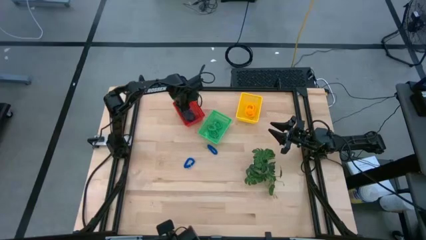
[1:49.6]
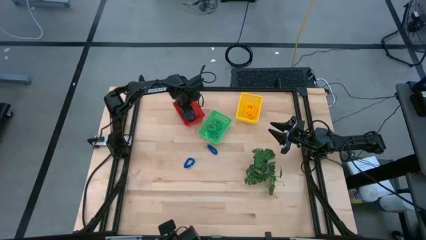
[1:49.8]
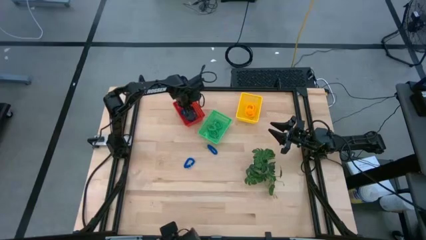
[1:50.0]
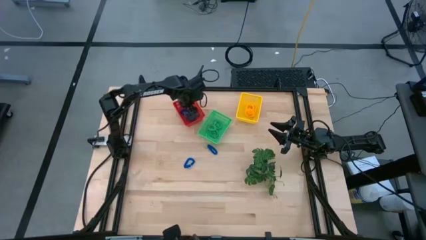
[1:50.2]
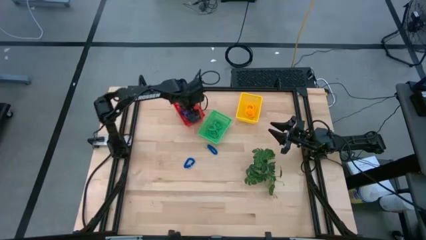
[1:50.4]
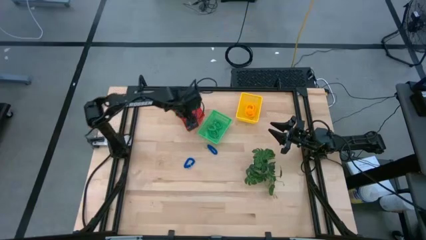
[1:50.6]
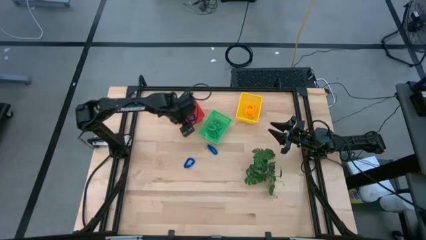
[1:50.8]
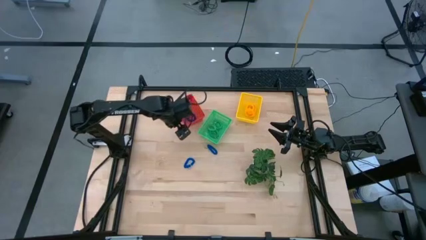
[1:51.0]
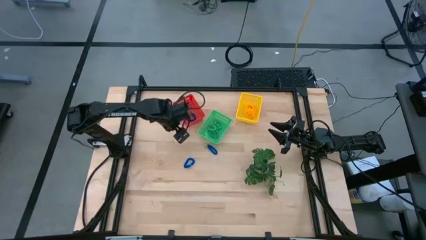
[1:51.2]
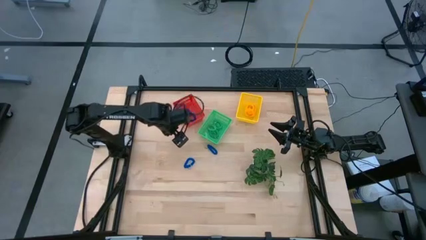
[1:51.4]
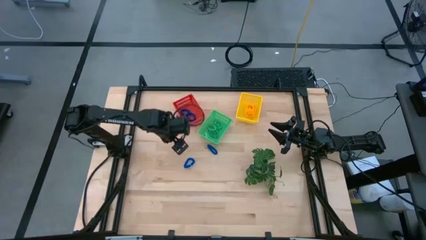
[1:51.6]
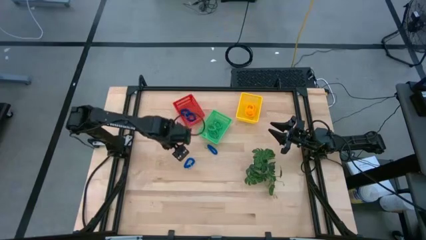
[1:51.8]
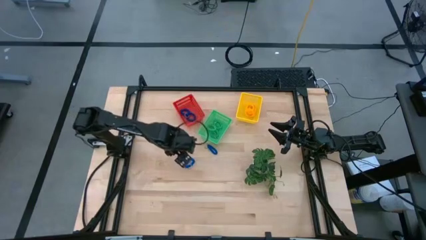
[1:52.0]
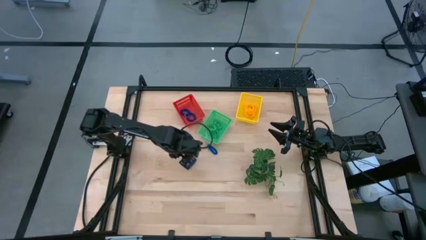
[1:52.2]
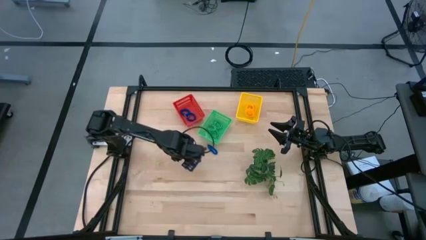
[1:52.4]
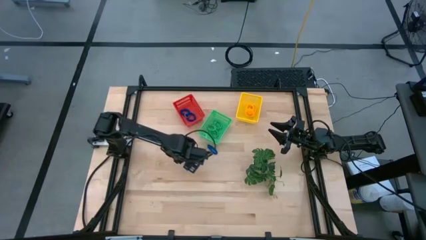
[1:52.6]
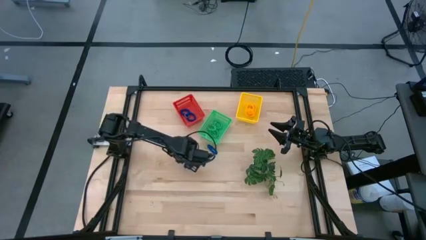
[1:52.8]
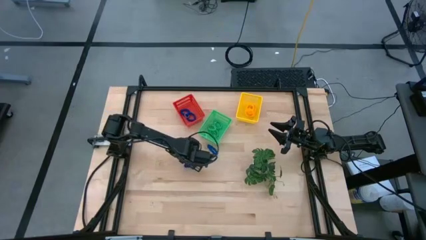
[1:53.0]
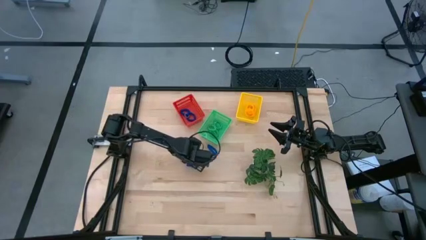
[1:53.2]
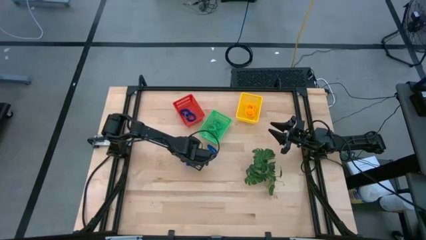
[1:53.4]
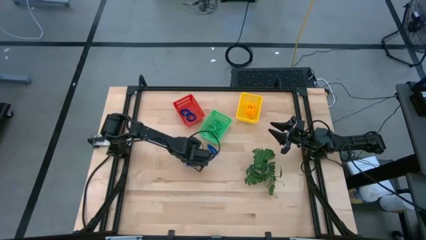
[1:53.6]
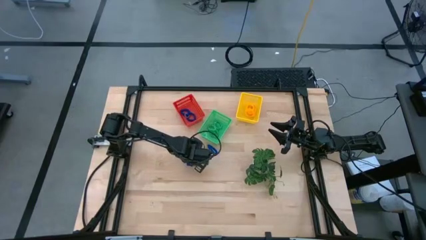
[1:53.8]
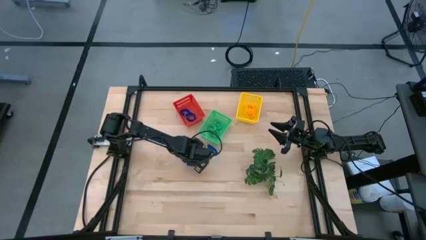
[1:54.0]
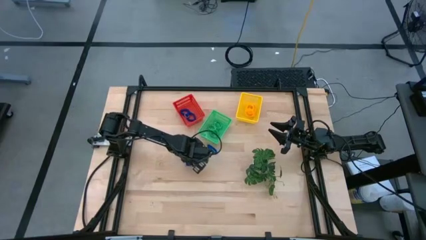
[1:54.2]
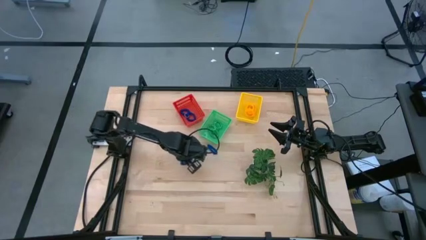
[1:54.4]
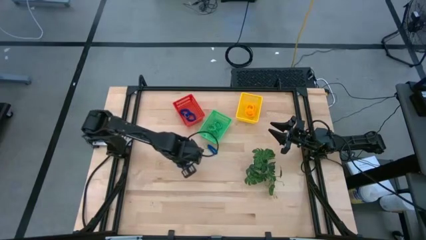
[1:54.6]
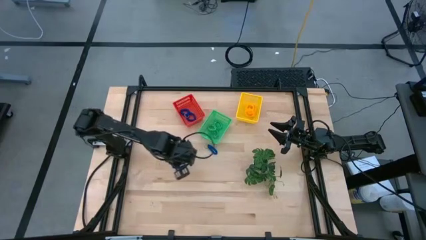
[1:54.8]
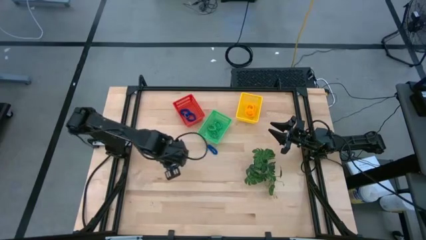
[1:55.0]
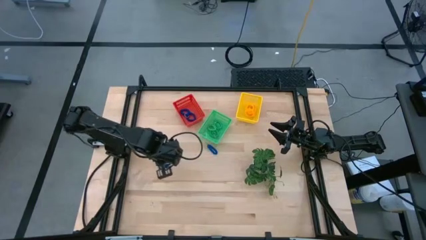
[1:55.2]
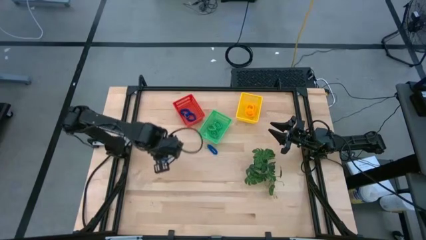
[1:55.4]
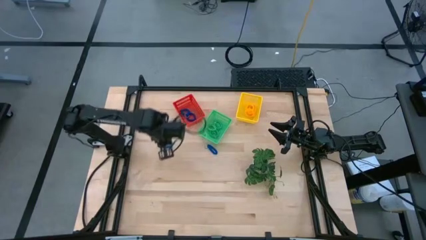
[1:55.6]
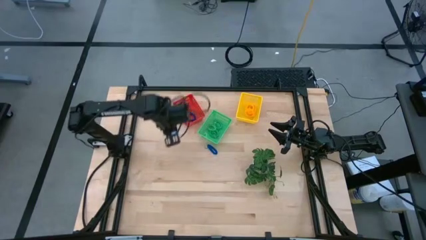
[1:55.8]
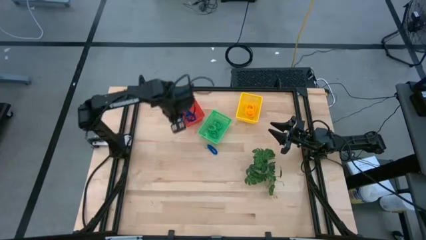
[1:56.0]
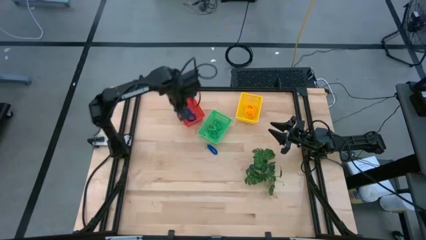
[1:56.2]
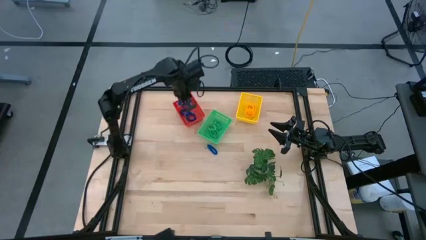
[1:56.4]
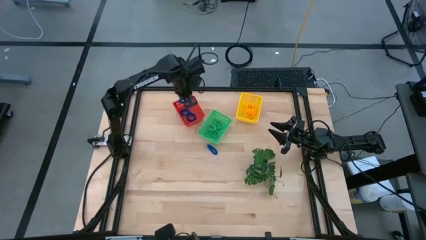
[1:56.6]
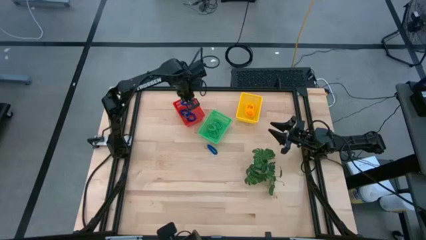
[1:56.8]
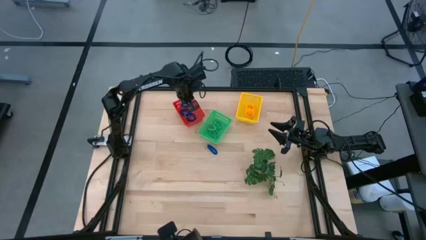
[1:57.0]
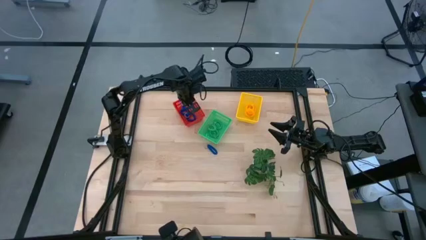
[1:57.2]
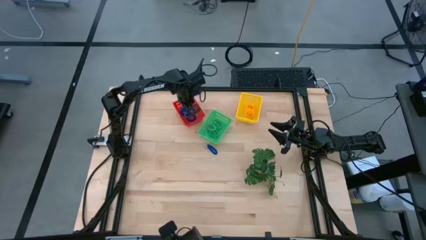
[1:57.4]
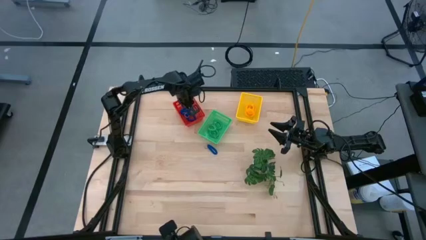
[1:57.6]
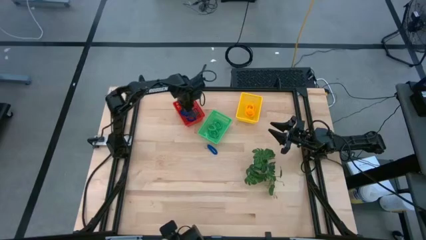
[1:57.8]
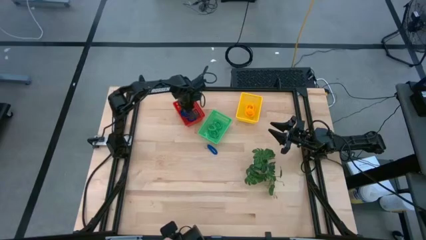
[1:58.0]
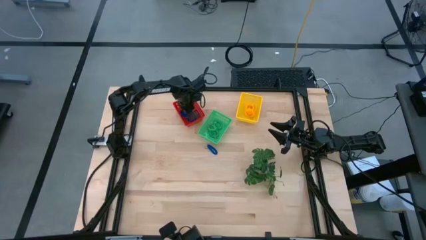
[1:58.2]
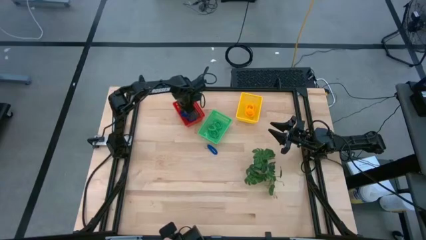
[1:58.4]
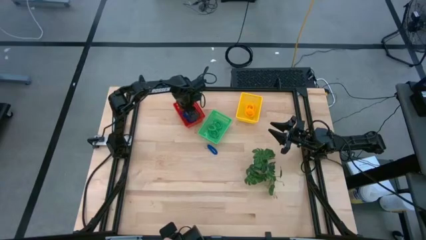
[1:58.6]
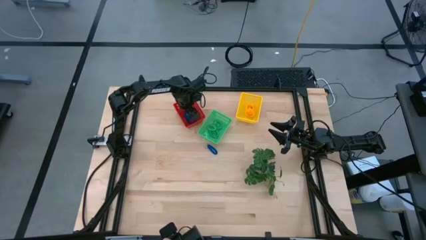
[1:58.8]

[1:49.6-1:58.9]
Task: Sort spring keychains
Put the blue spring keychain into the red bin

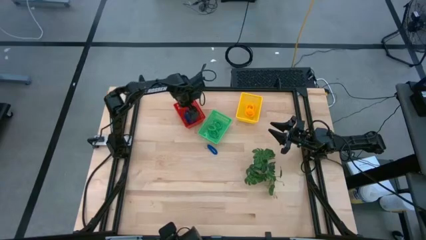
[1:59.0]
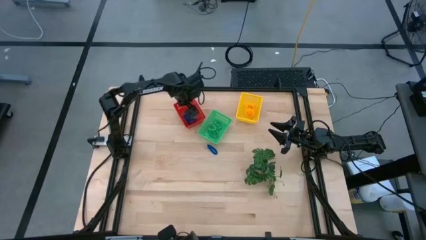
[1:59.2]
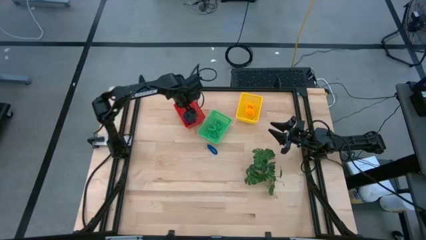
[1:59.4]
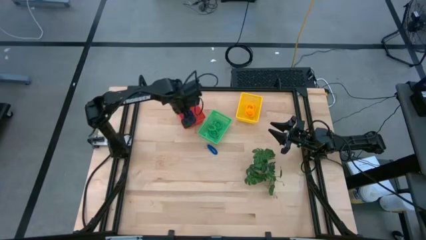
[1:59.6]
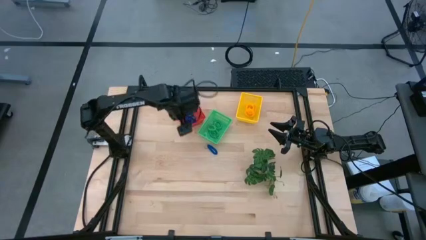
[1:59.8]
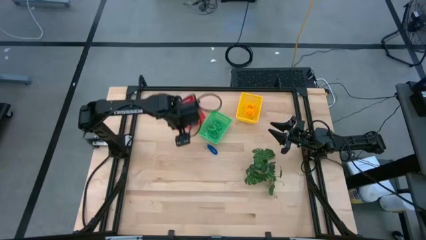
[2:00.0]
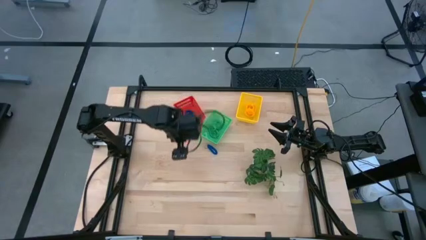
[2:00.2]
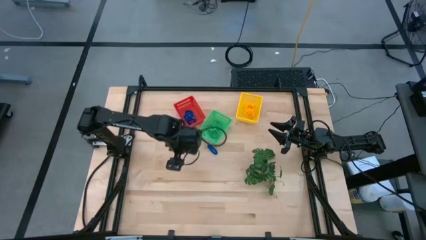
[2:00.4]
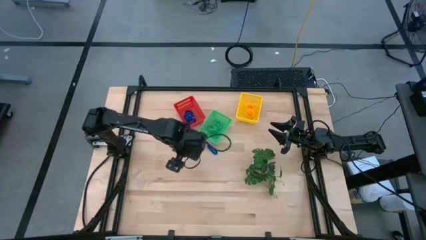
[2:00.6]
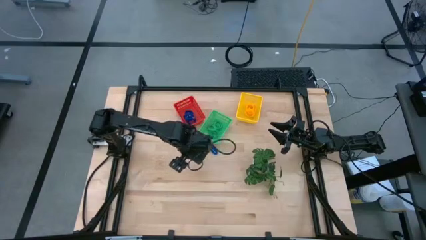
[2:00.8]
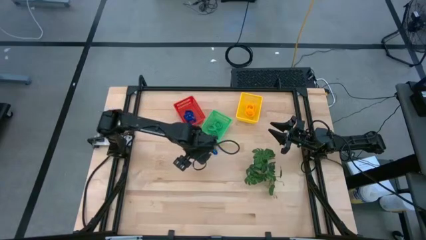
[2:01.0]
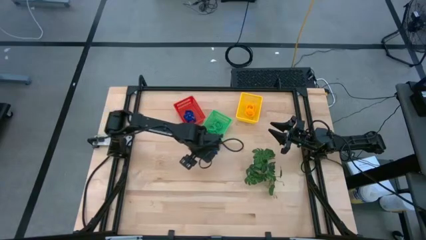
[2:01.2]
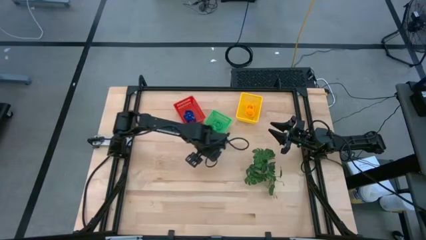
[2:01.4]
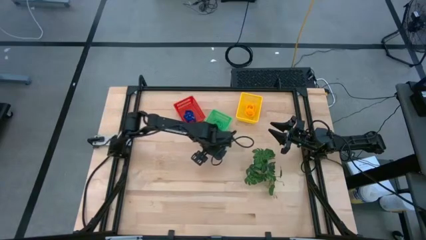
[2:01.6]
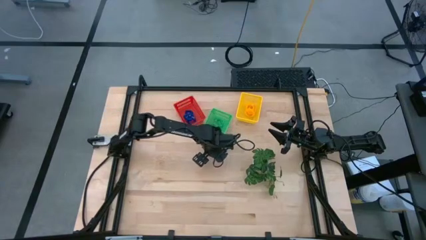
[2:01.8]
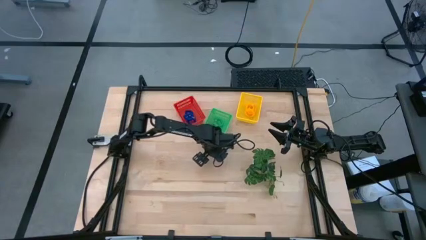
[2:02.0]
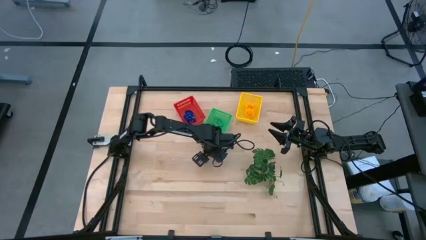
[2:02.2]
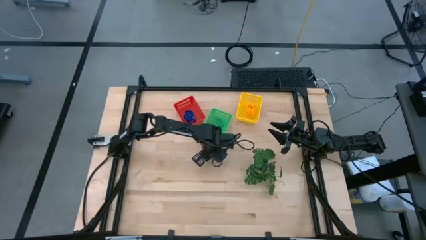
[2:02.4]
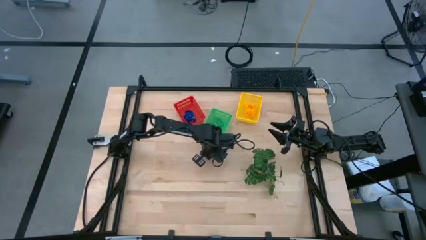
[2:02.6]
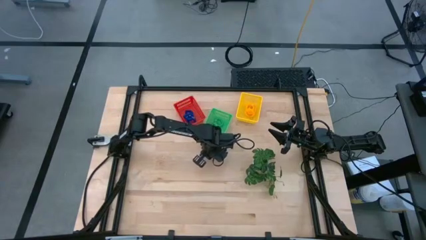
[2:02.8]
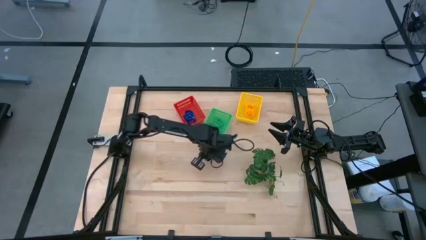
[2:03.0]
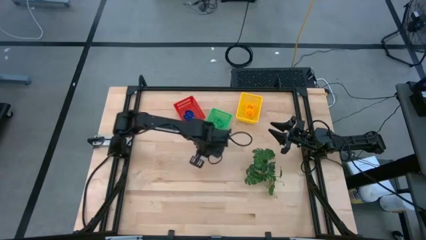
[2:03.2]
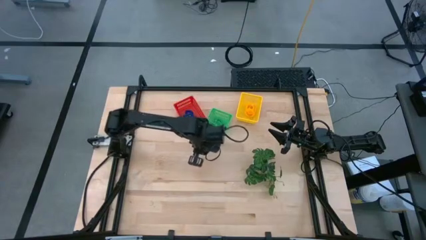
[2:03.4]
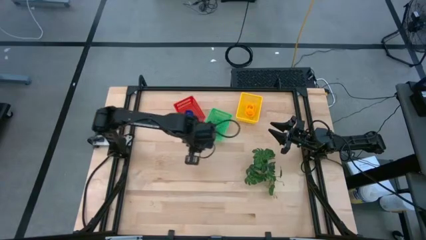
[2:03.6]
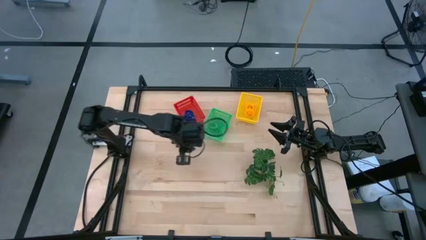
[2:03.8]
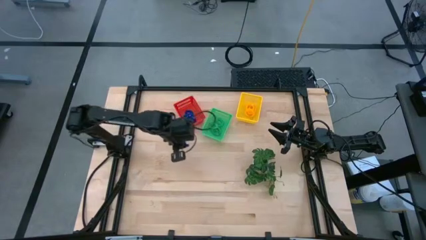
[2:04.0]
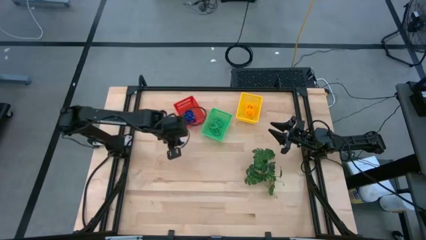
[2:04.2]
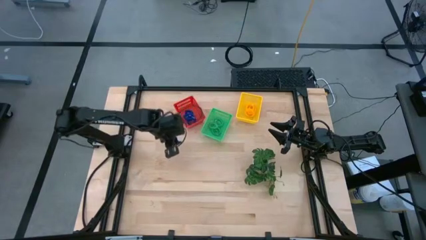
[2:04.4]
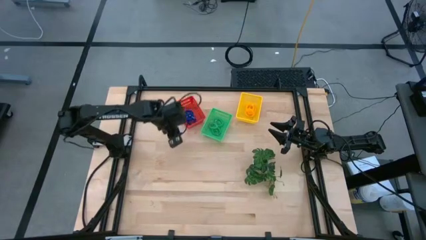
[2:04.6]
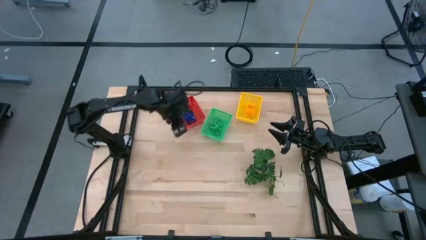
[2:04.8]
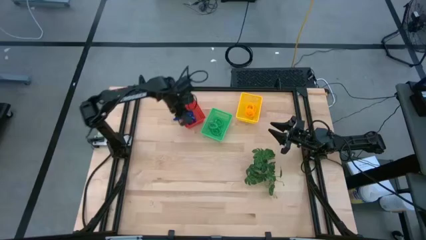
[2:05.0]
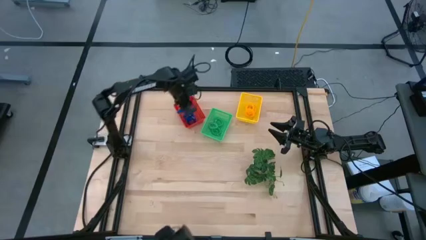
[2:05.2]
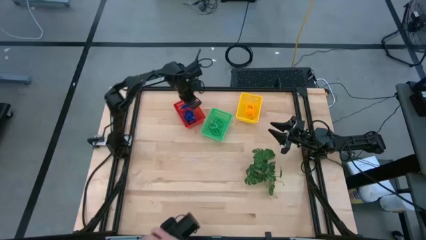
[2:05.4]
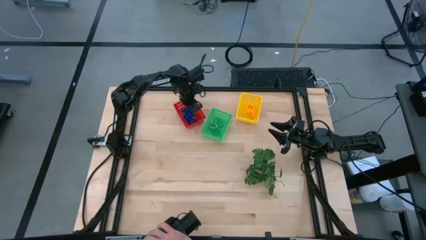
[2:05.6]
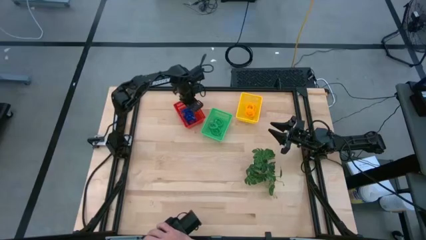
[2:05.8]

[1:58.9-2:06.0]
Put the blue spring keychain into the red bin

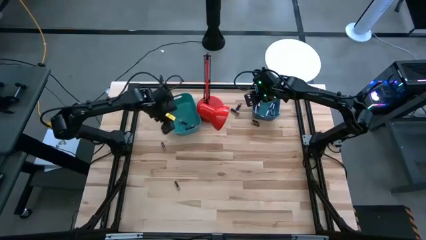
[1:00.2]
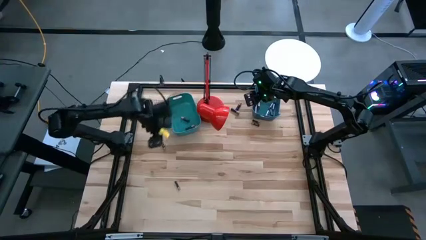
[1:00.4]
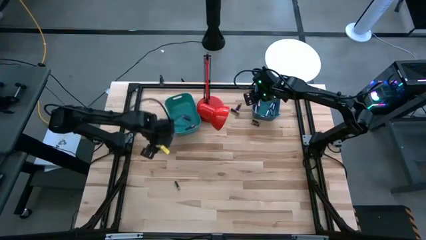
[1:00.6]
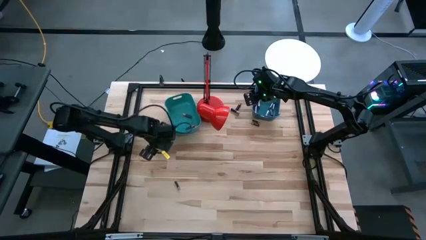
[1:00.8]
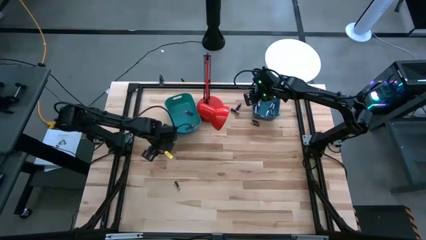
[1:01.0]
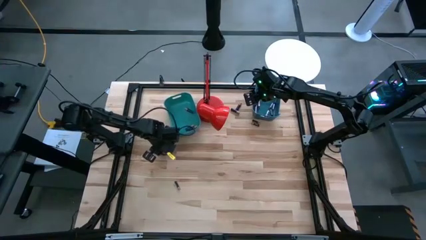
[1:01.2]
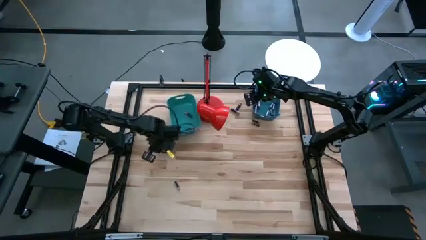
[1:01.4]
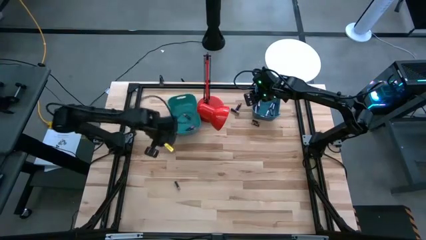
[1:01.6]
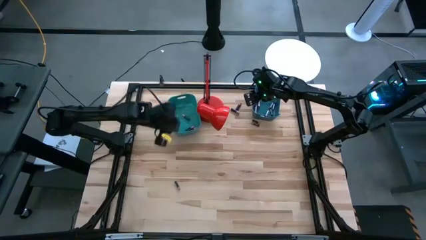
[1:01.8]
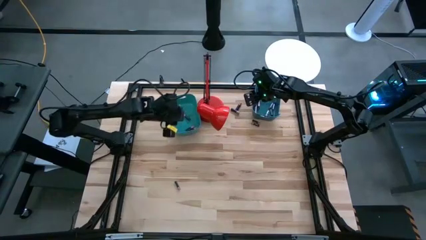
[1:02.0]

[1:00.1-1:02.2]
Task: Sort batteries
Put the brown battery into the green bin
